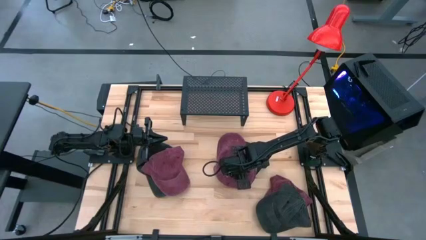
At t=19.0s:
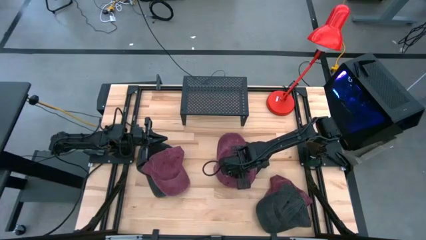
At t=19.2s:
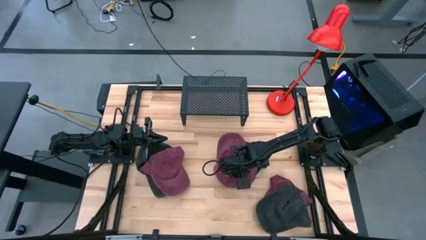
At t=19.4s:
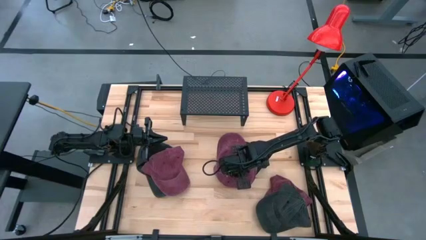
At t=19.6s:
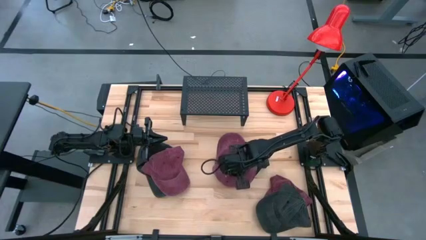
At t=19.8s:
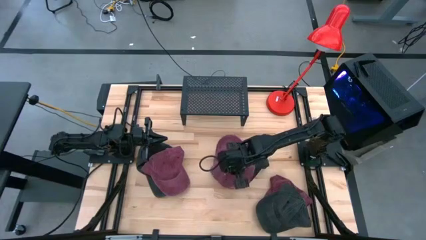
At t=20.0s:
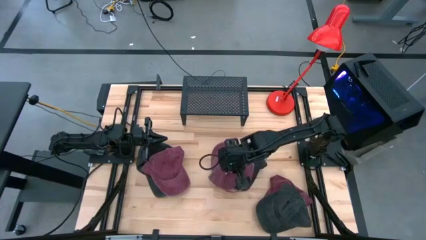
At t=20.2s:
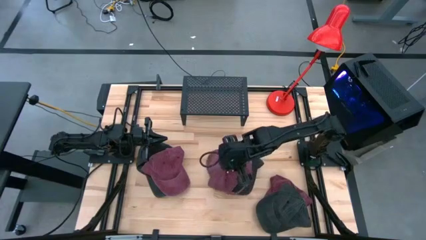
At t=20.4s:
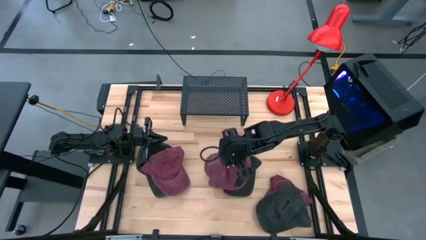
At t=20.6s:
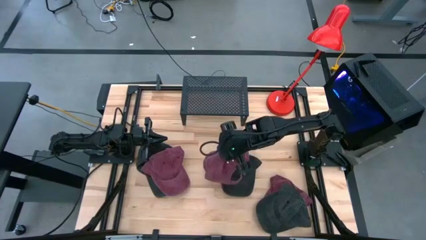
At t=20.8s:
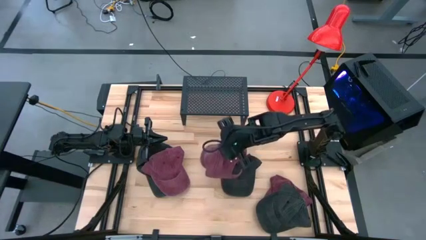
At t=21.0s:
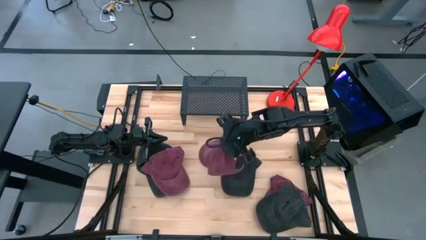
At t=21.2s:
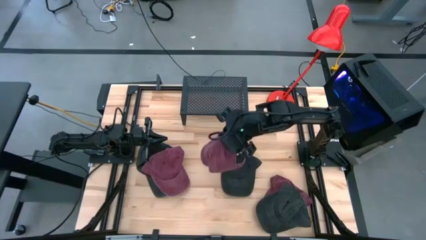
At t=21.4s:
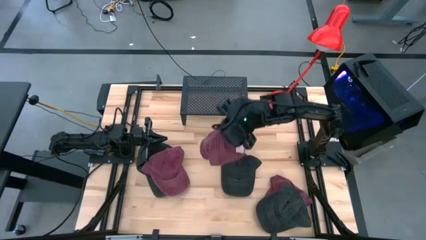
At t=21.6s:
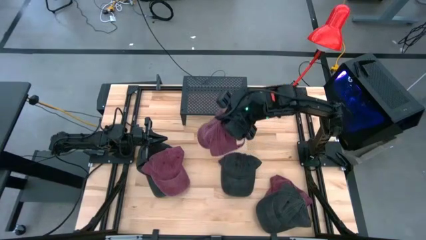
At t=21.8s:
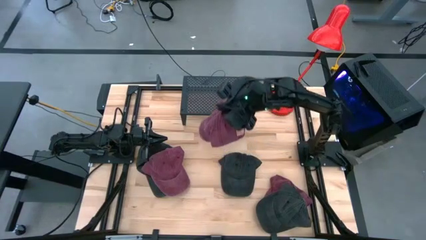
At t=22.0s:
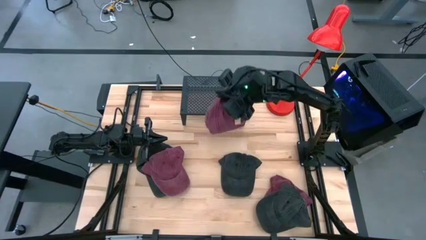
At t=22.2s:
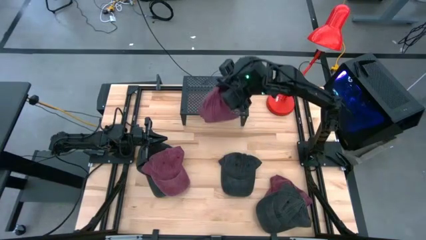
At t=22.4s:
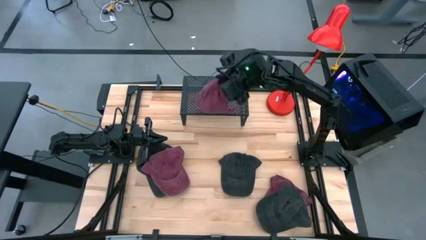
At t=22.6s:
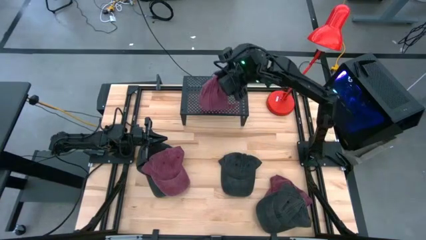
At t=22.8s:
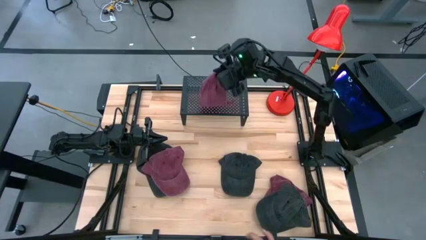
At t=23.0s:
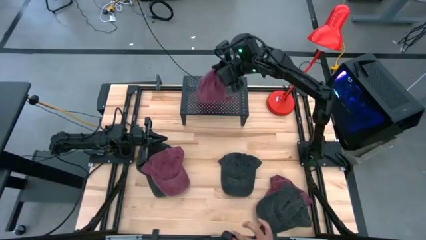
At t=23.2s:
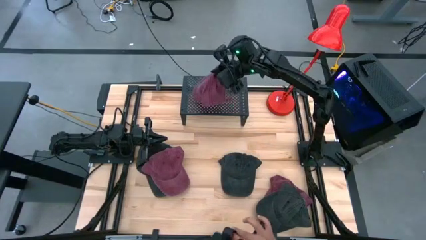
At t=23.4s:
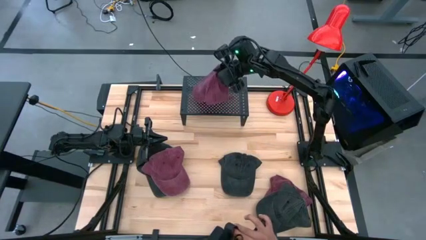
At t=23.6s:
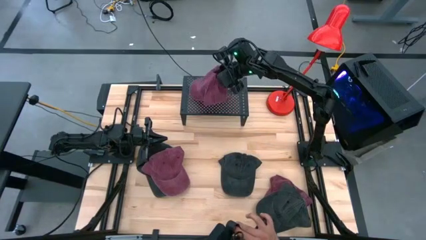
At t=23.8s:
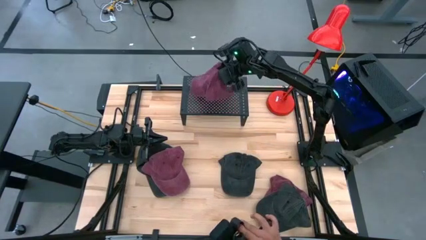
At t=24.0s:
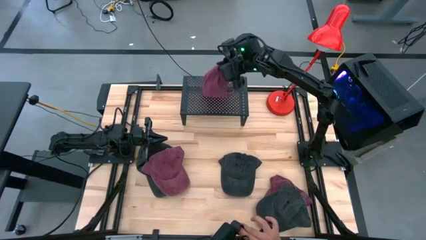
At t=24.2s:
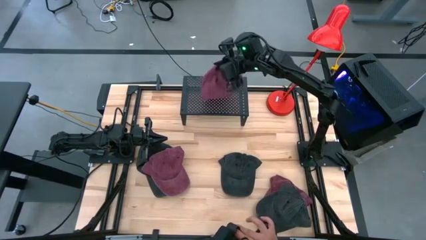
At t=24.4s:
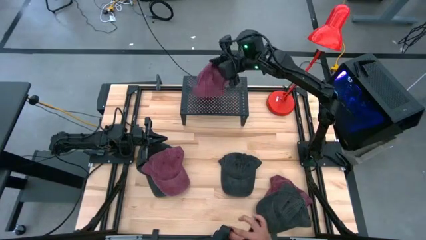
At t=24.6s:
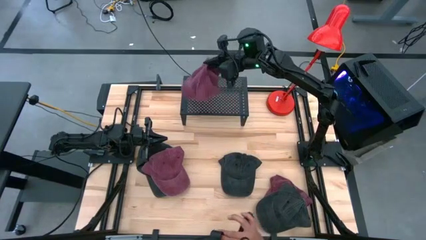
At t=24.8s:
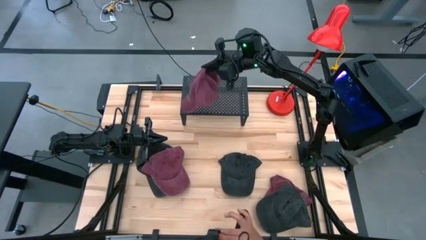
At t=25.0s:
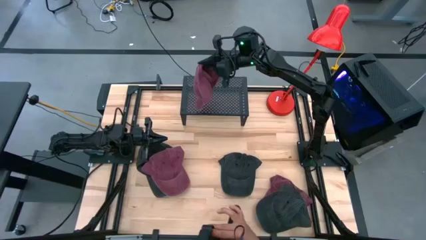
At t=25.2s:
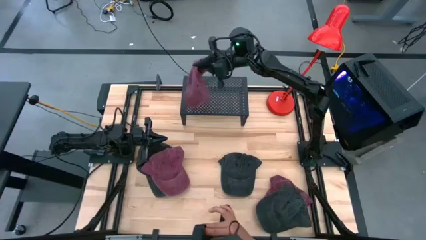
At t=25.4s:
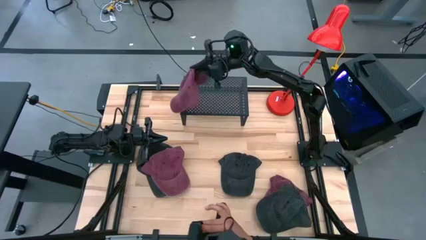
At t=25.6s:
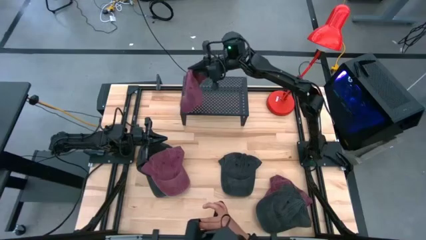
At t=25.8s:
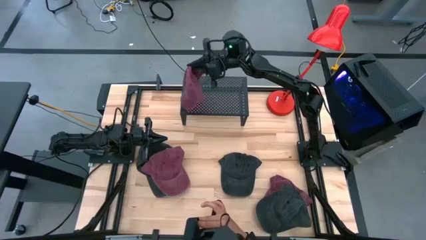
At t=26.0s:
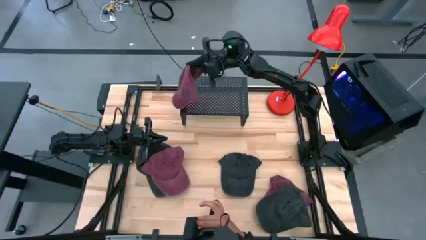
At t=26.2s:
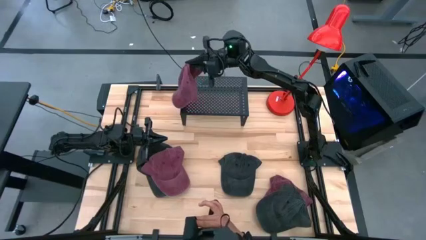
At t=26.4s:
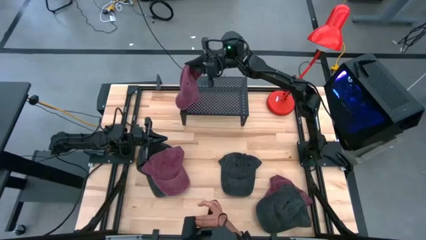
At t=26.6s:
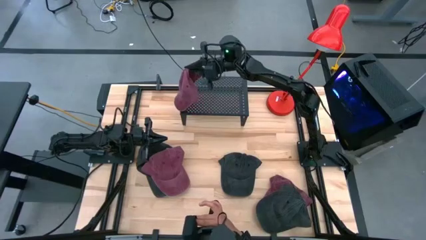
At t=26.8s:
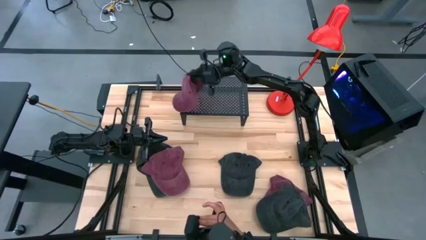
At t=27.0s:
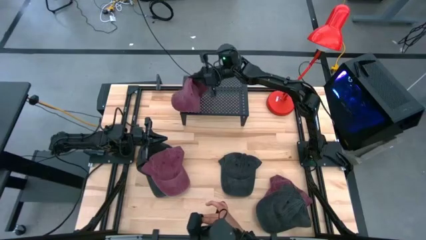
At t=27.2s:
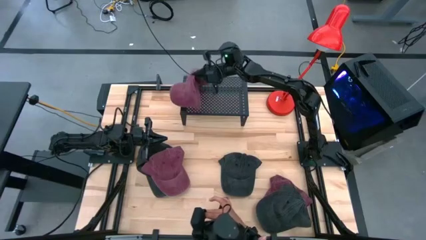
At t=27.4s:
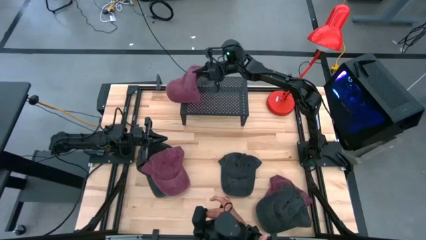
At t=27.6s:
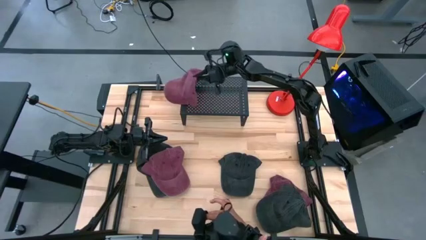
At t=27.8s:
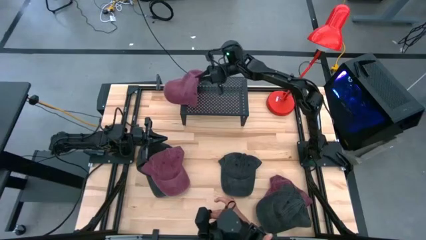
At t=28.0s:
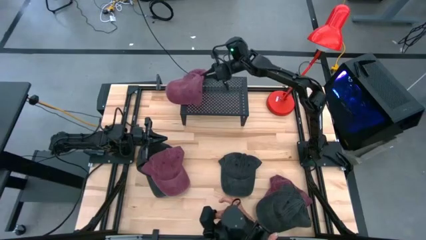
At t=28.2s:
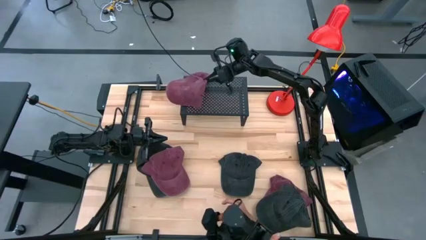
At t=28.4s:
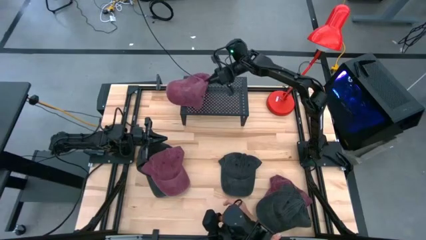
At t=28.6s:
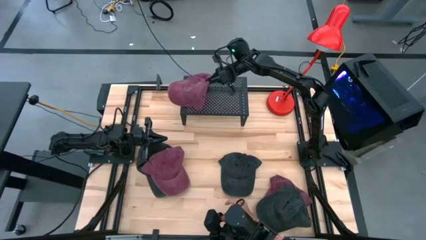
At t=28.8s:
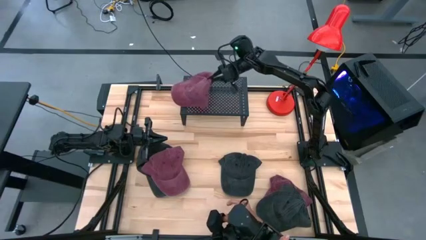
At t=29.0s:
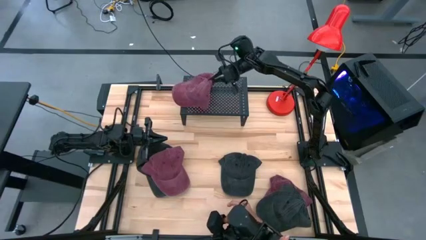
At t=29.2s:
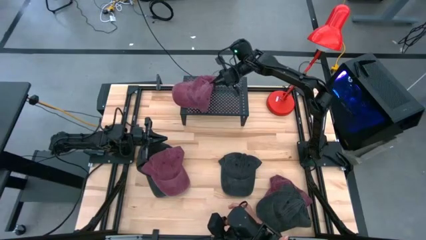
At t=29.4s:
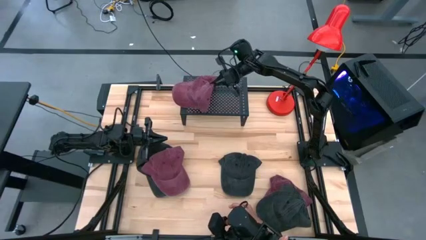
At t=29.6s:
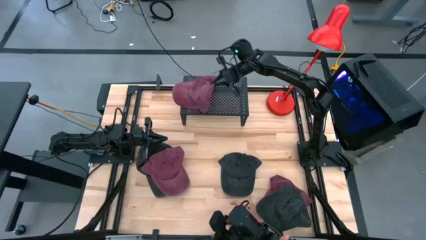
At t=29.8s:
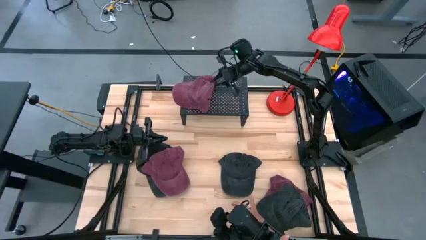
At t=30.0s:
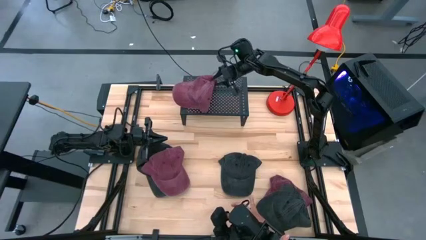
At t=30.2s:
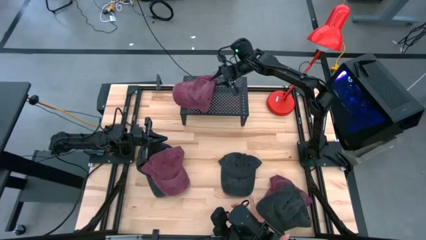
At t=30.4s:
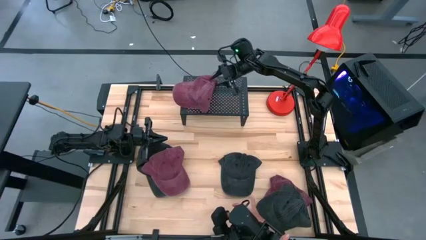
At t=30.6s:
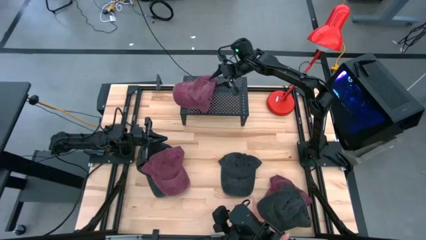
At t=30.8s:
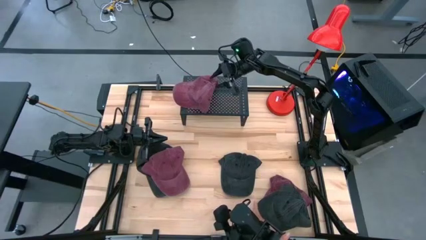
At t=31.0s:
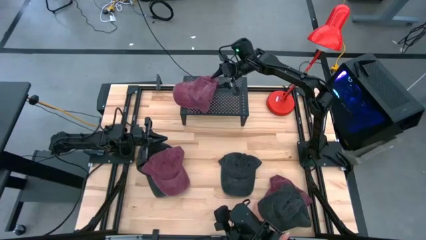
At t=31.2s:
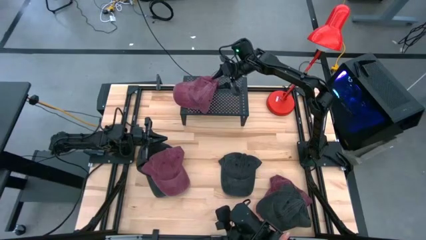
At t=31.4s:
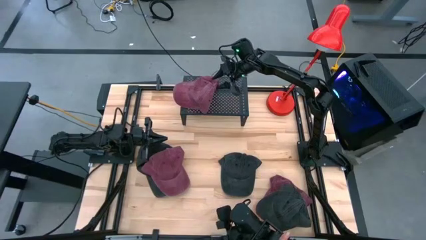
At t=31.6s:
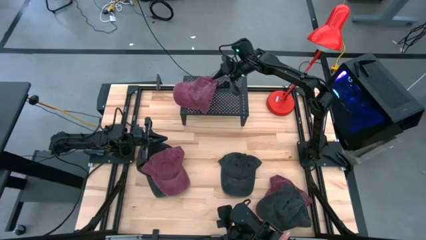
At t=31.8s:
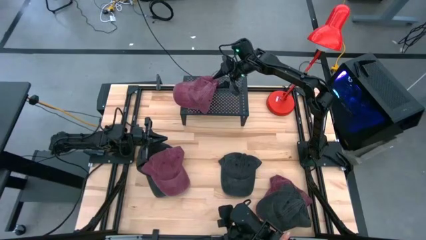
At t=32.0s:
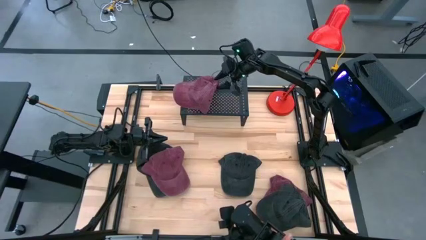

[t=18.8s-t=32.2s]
Task: Pick & Place hat
Put the middle red cap on the shelf

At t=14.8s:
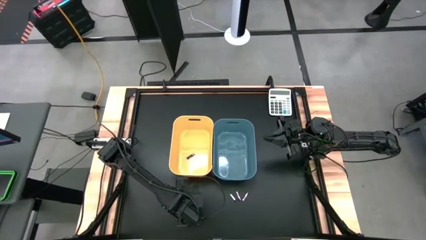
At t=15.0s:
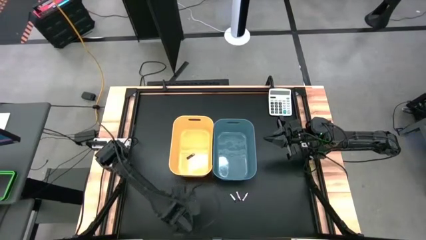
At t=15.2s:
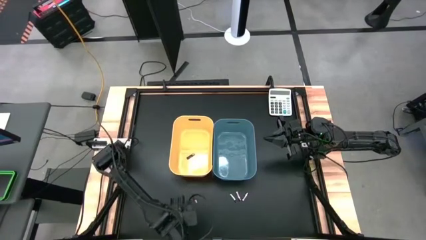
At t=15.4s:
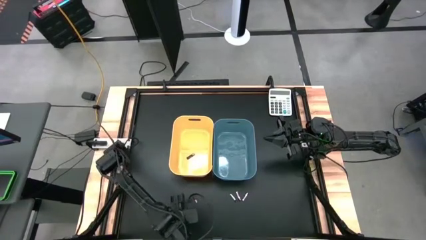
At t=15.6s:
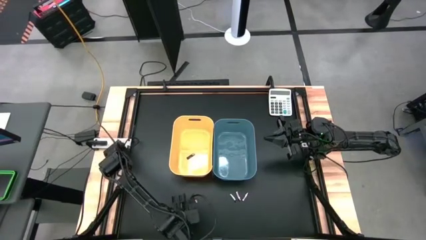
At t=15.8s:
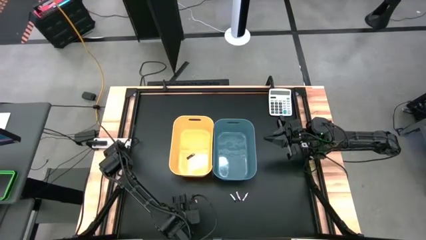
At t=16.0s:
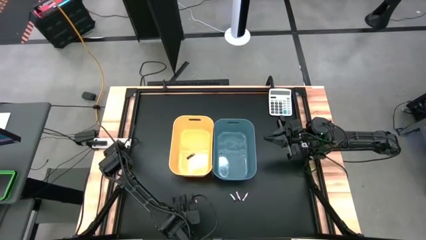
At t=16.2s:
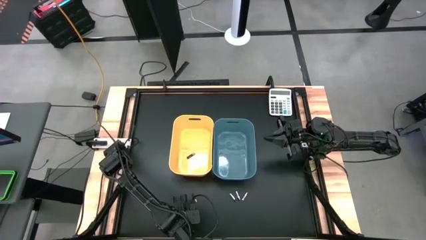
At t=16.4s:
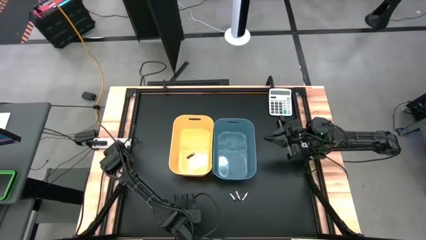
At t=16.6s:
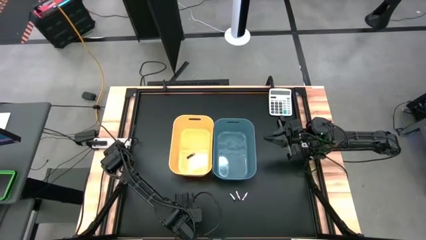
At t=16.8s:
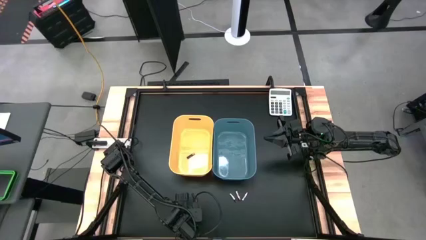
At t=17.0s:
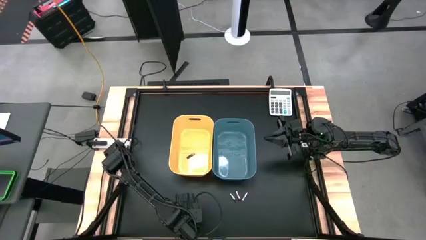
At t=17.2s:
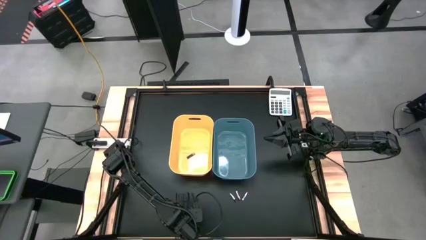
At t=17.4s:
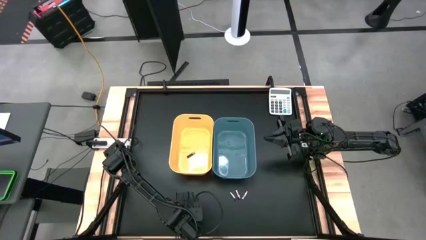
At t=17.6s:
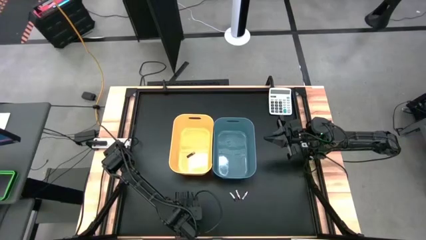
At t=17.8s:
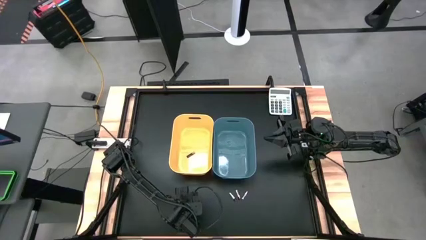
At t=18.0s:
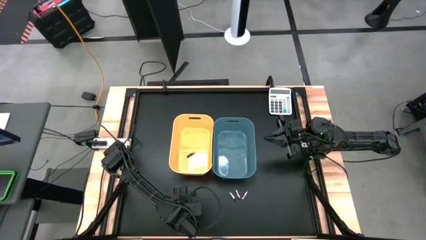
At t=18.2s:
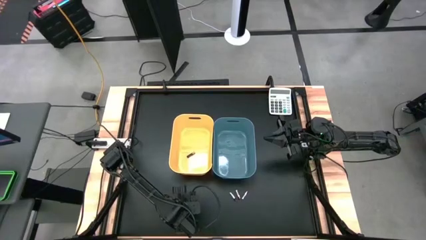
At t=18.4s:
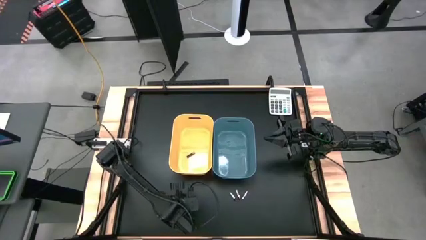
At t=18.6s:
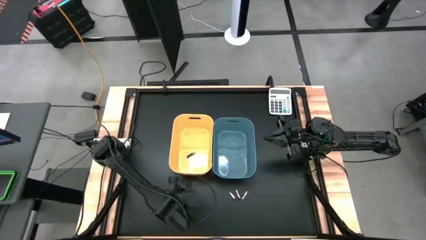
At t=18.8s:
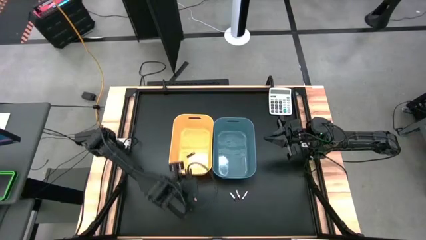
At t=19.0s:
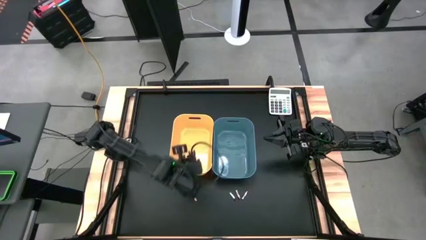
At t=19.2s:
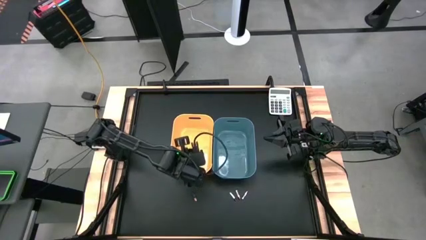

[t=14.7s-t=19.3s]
Task: Sort batteries
Put the bottom black battery into the yellow bin
